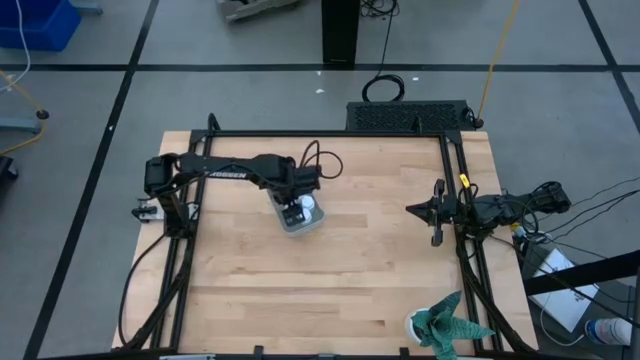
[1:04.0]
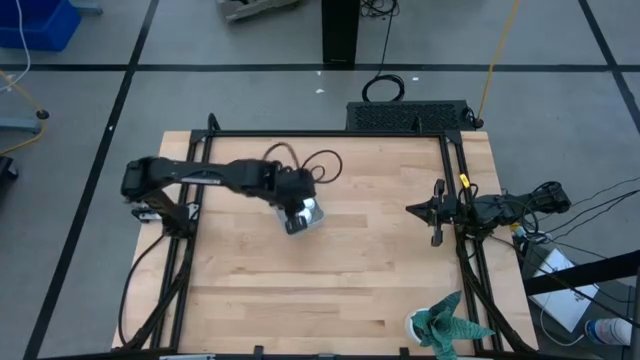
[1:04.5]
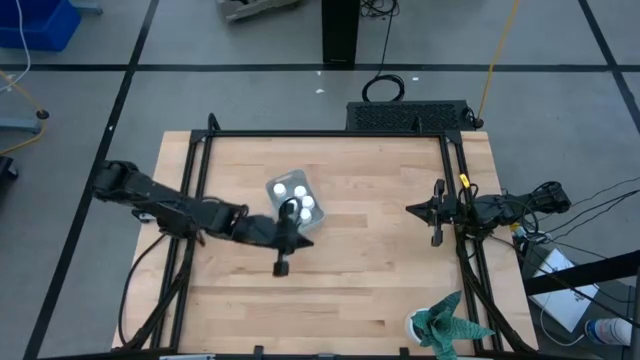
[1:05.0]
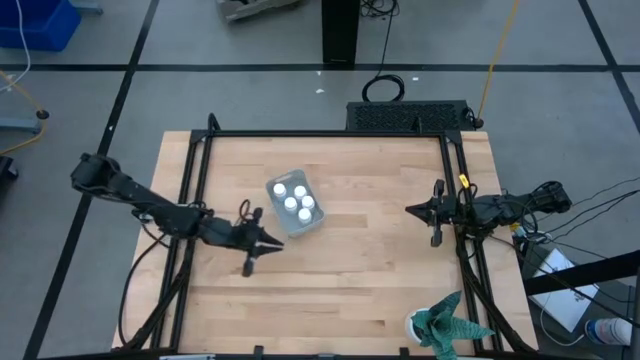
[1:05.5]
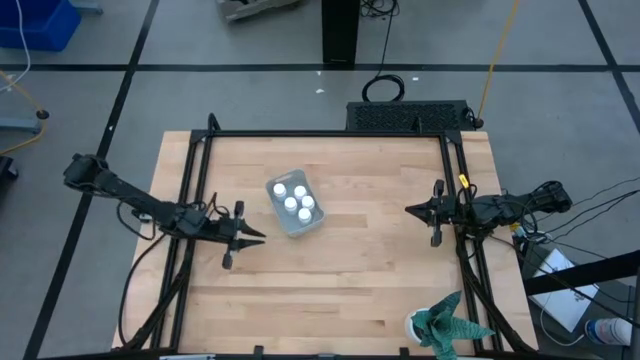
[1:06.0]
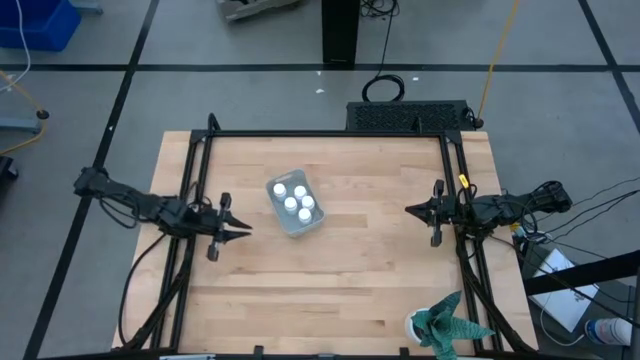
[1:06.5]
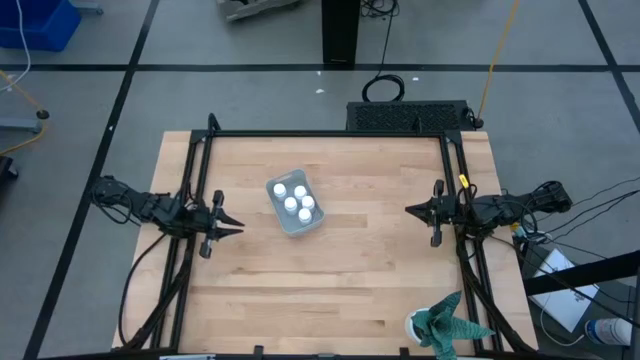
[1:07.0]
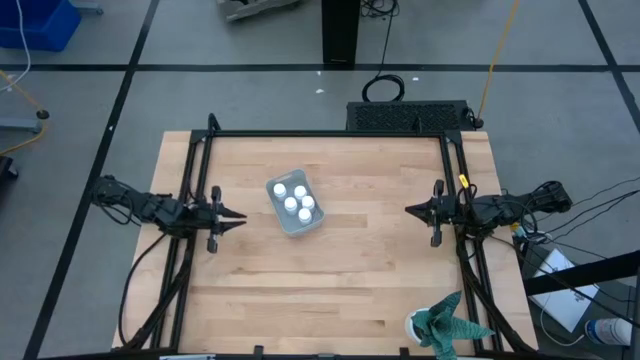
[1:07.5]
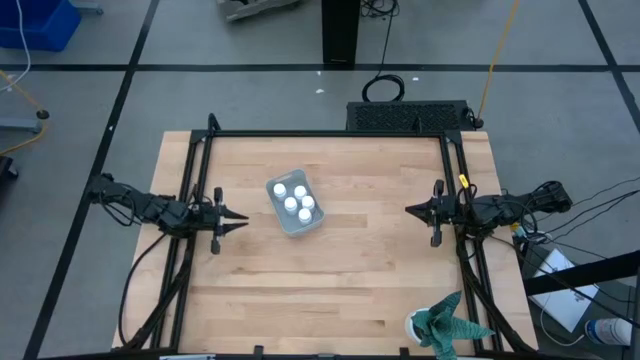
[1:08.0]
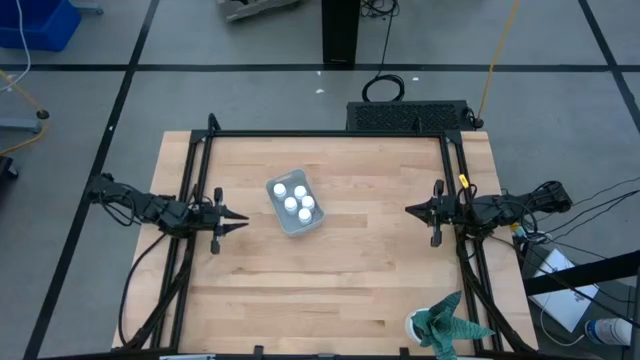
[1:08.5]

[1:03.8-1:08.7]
Task: Pick and place pill bottles into a basket
Return to Home Position

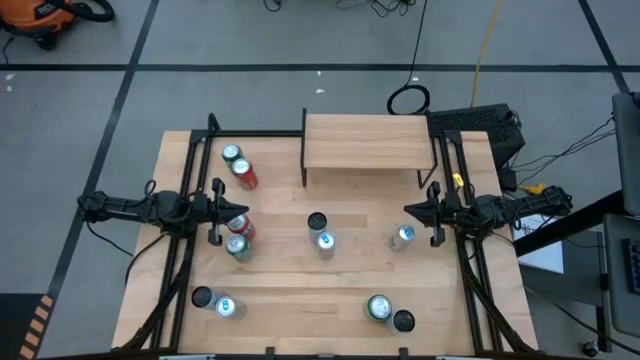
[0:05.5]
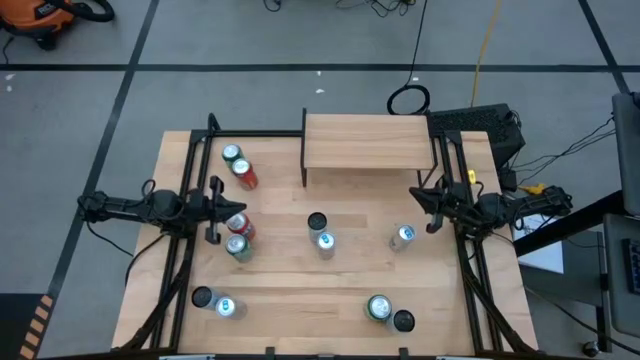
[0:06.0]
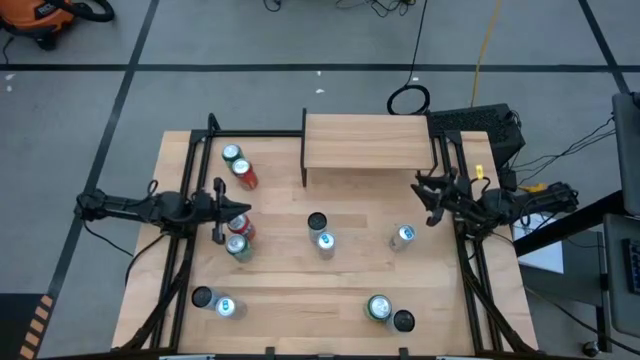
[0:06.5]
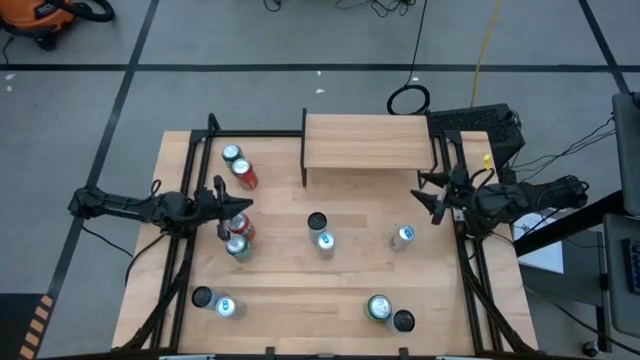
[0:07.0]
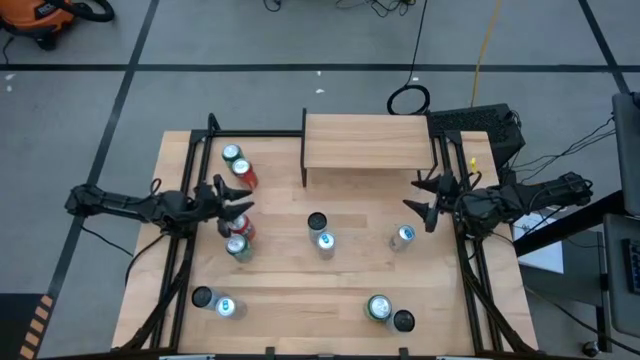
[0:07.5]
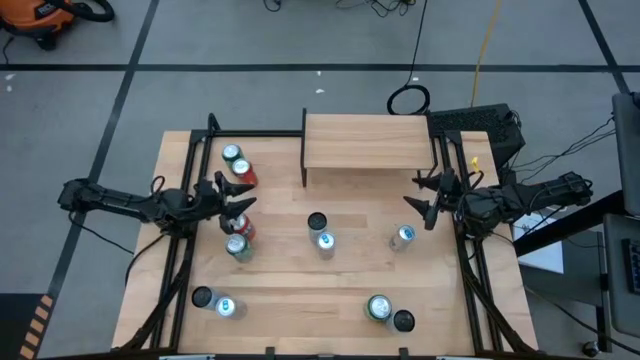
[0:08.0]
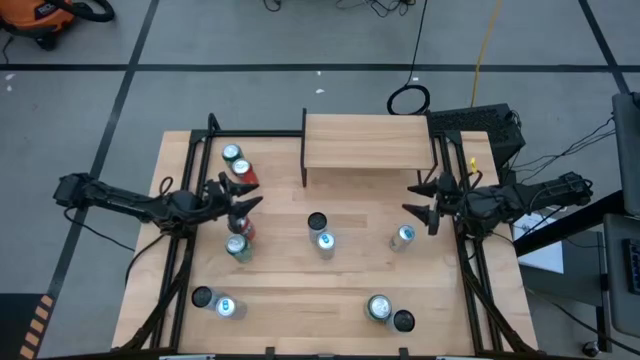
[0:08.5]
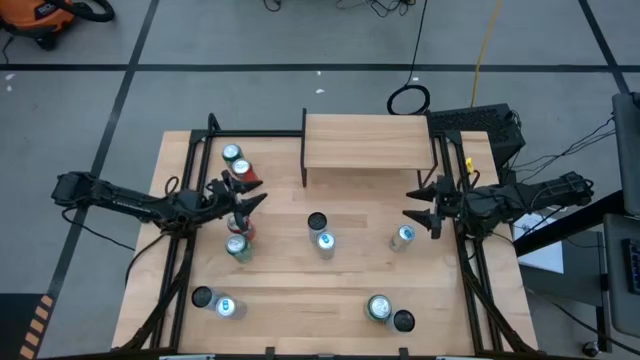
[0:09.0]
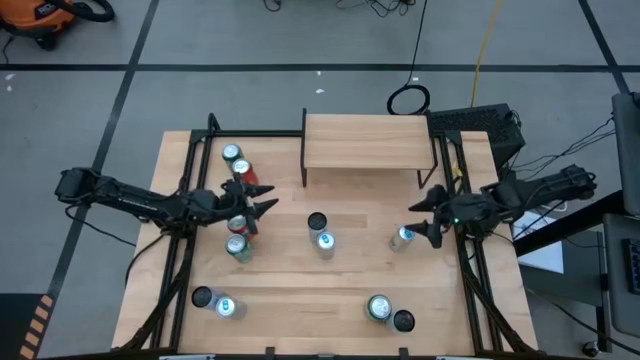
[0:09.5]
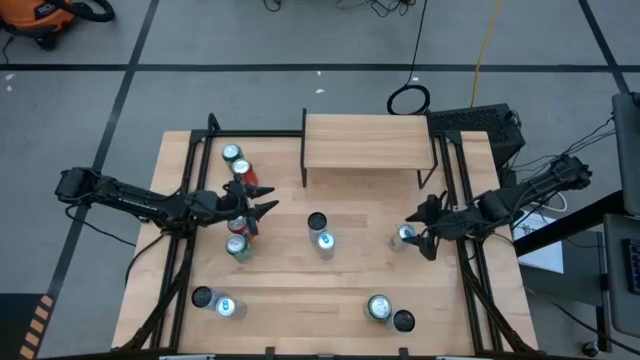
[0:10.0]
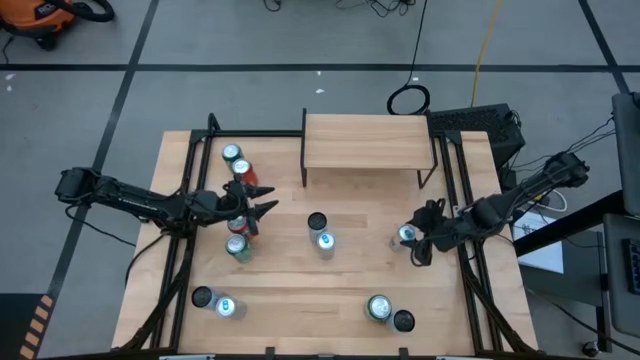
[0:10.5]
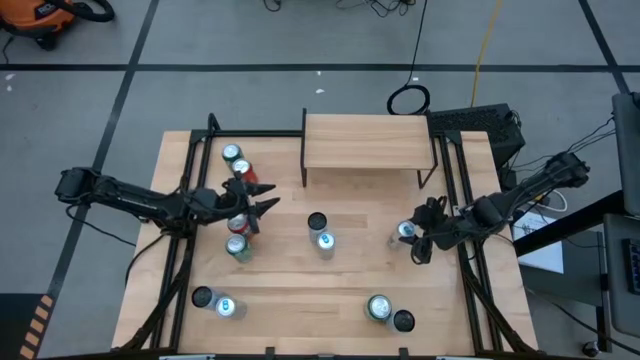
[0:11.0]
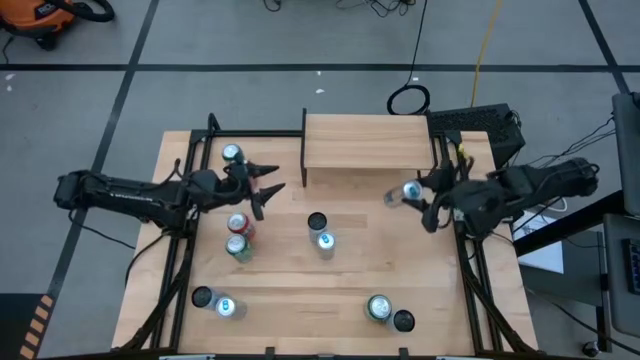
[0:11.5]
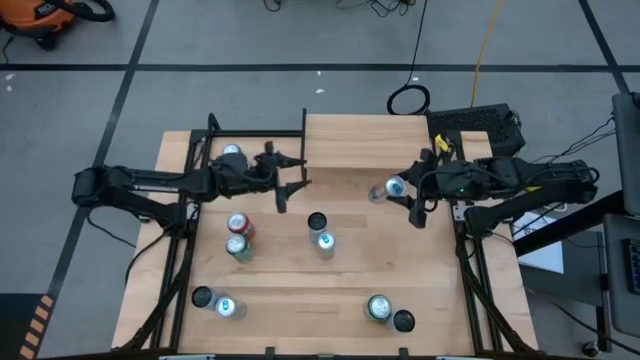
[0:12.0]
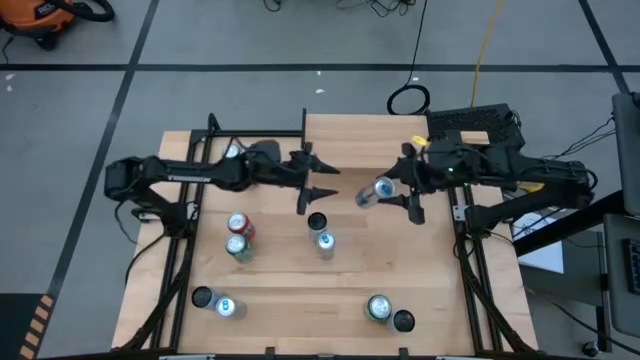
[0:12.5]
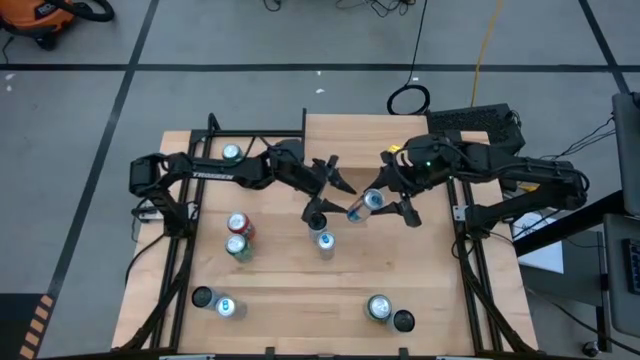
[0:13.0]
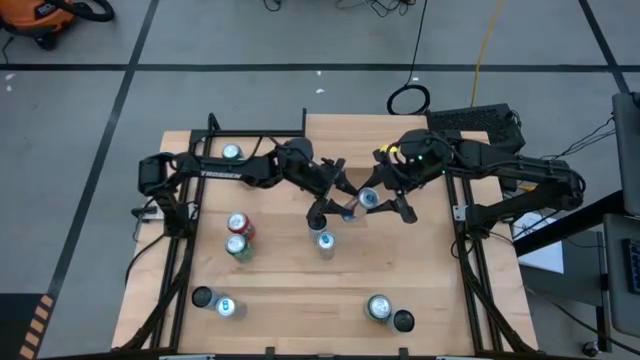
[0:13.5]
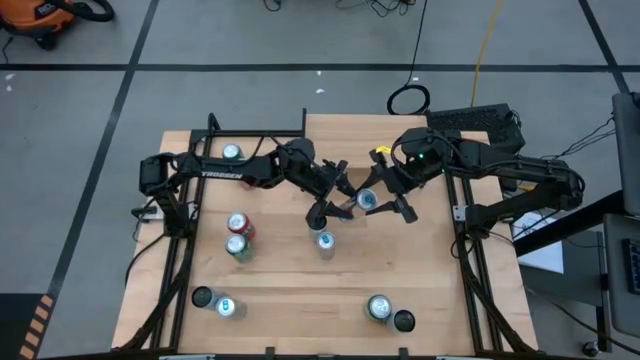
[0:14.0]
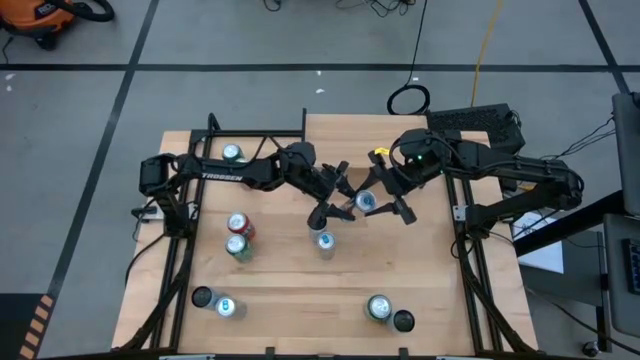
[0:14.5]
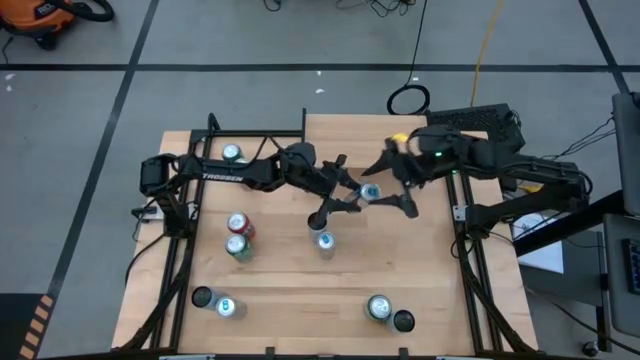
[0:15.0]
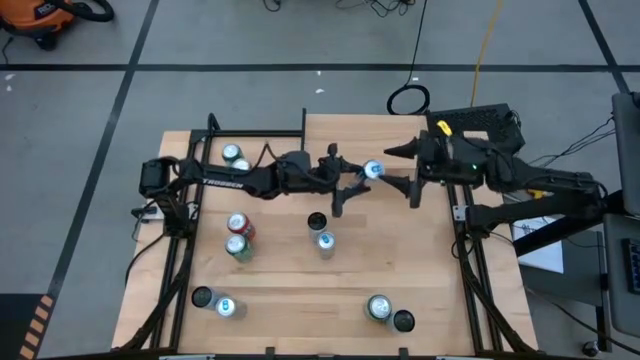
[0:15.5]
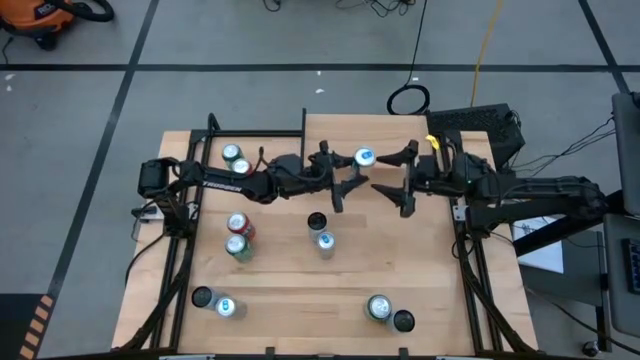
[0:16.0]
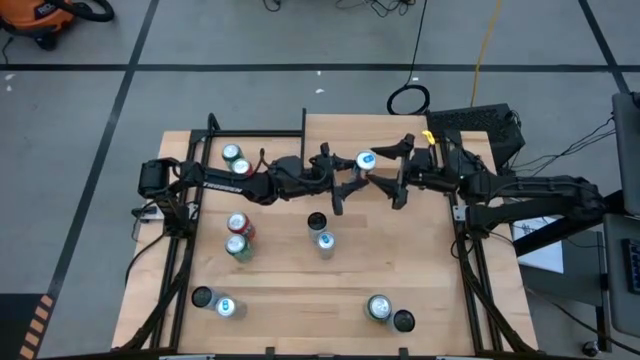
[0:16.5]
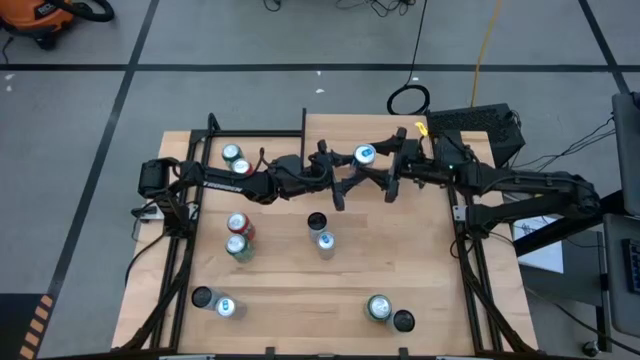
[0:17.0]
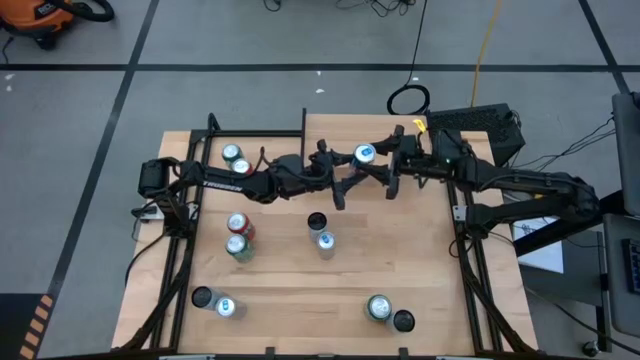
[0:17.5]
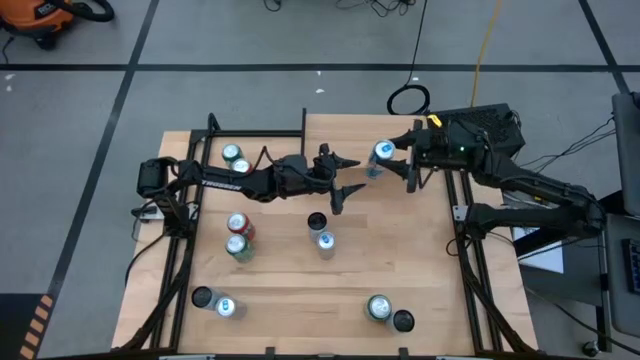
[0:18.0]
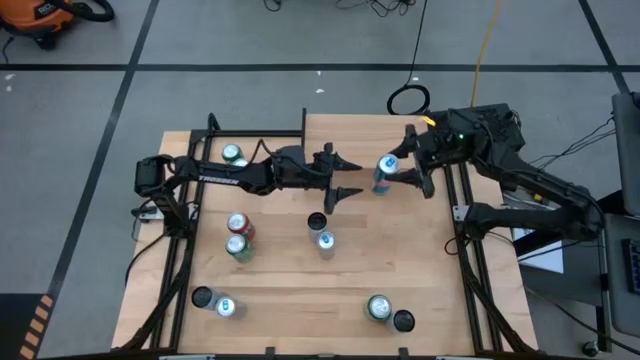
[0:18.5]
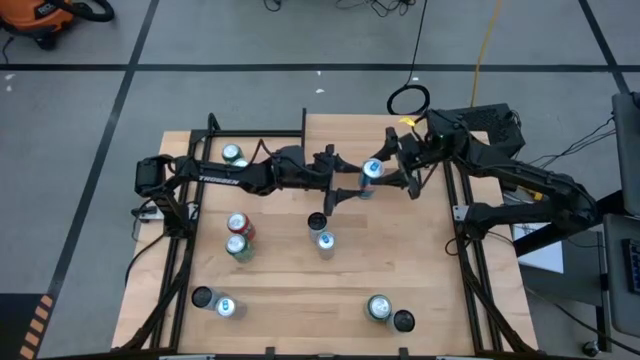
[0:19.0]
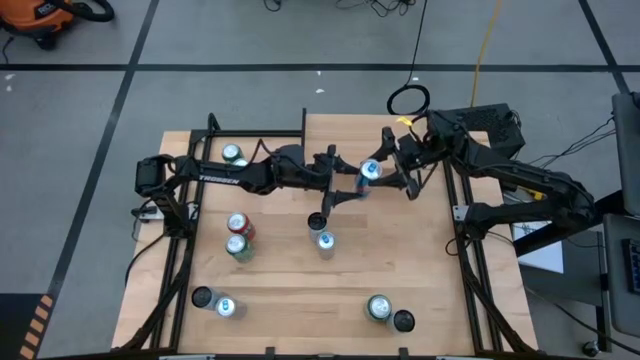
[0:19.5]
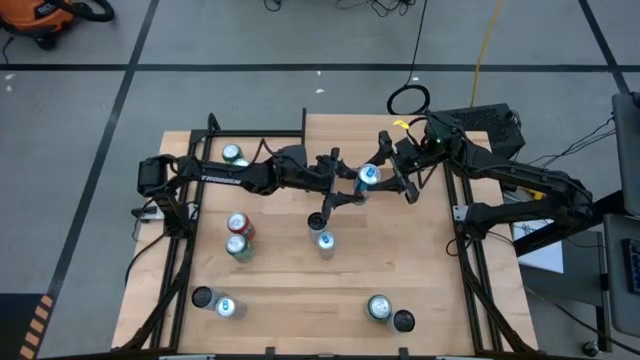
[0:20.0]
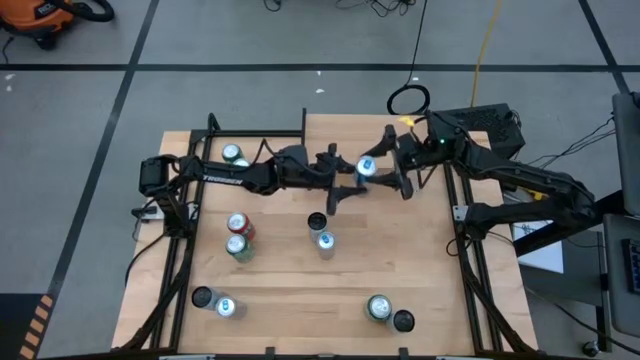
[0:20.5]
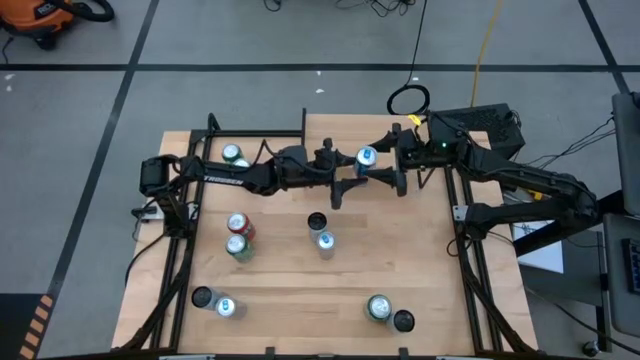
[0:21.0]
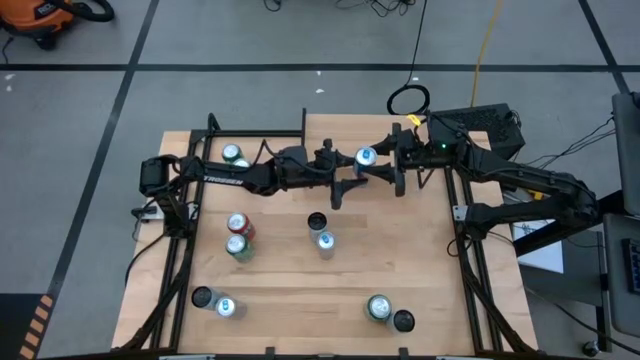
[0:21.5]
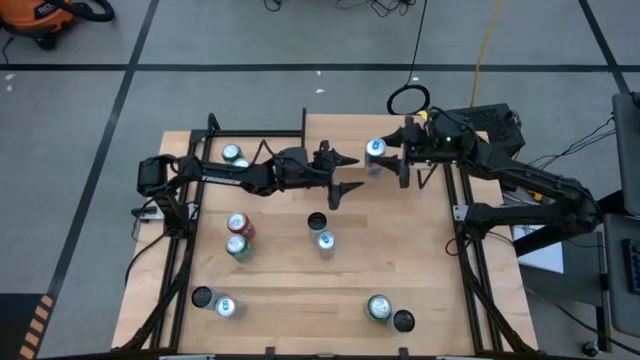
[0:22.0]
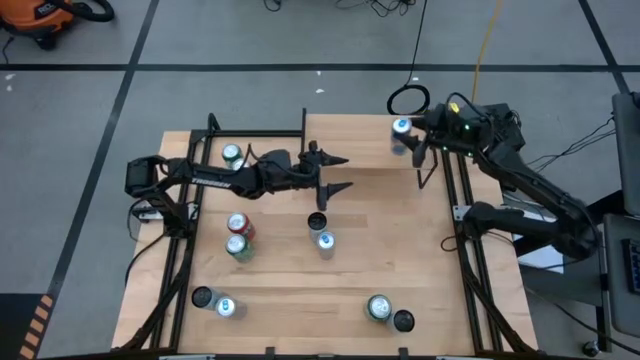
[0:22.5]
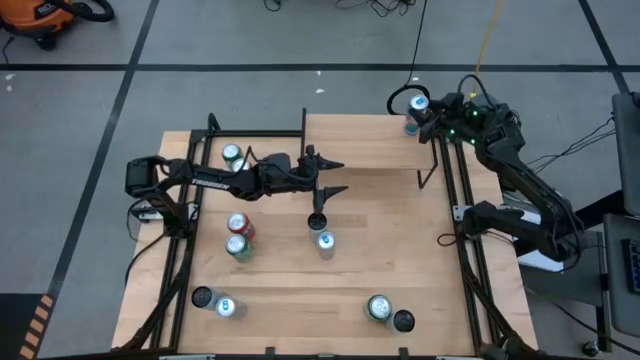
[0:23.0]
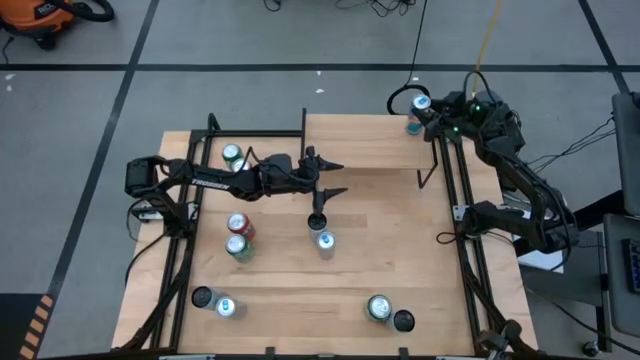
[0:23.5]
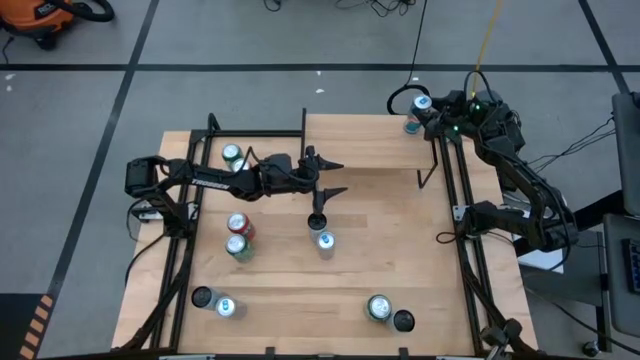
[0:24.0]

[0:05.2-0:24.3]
Task: Place canned beverage on shelf
Put the top right blue soda can on the shelf
